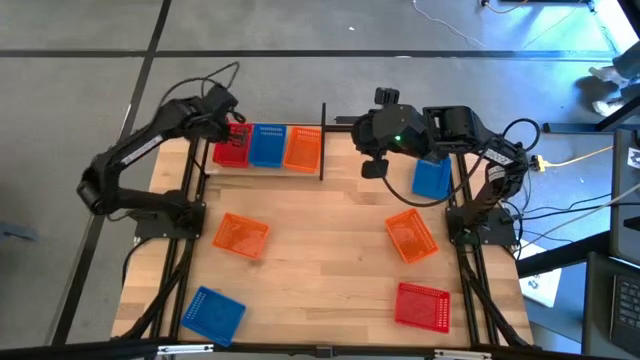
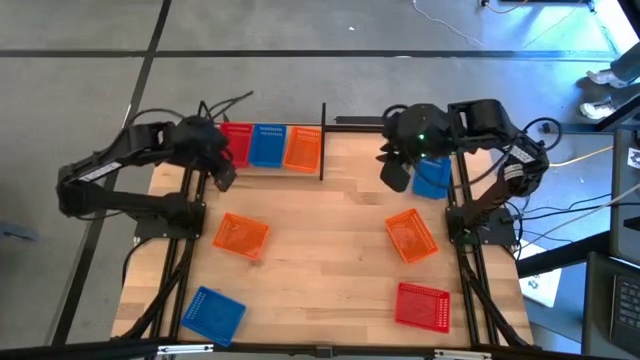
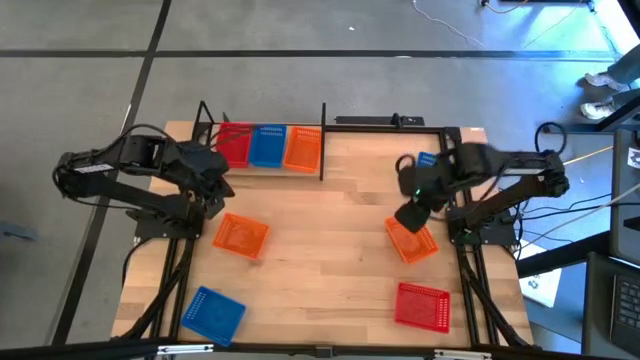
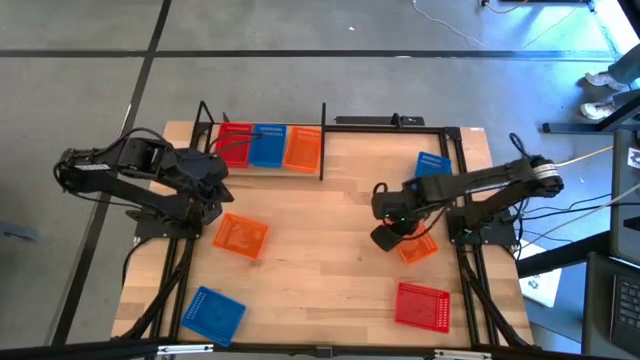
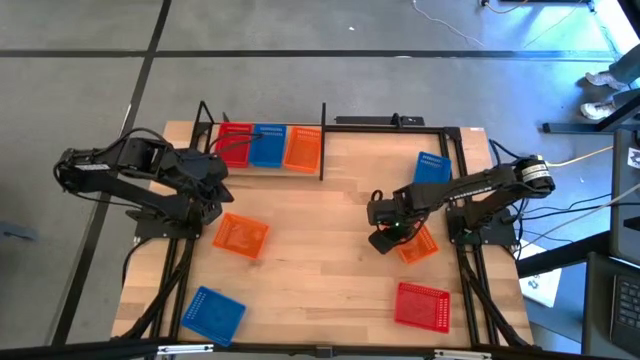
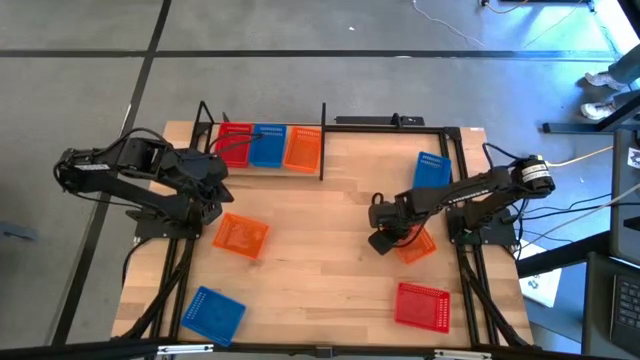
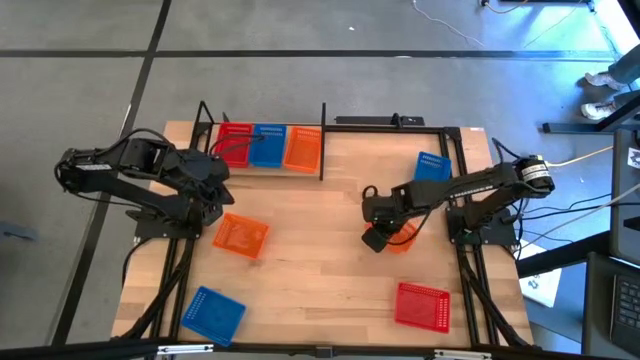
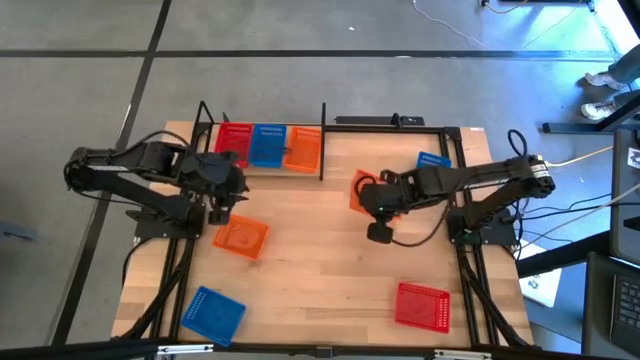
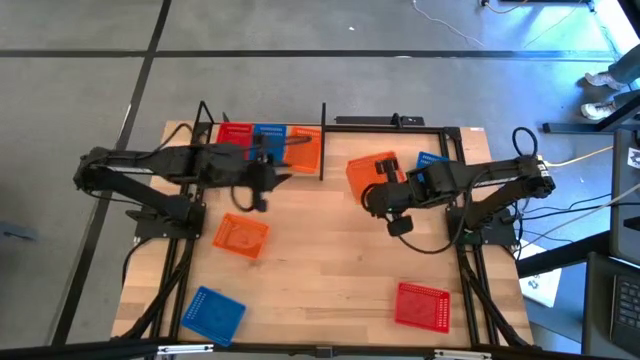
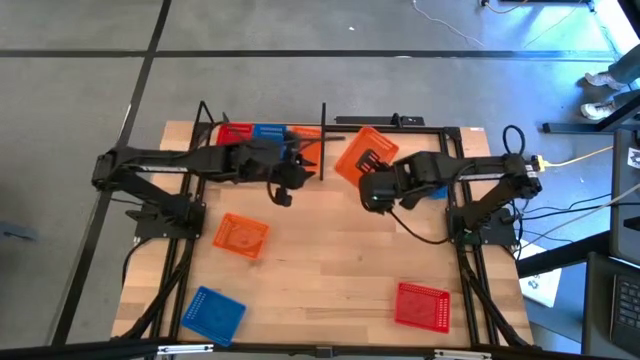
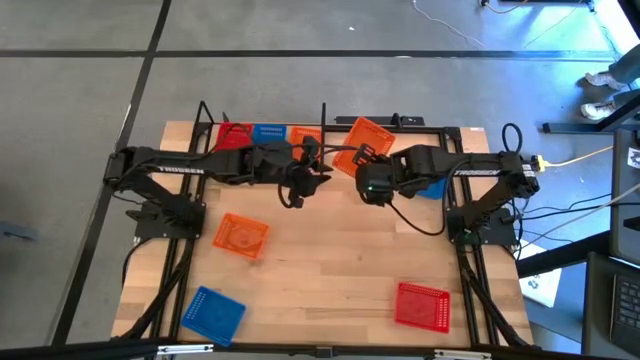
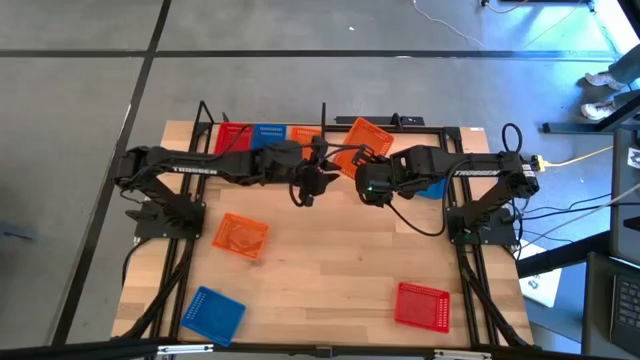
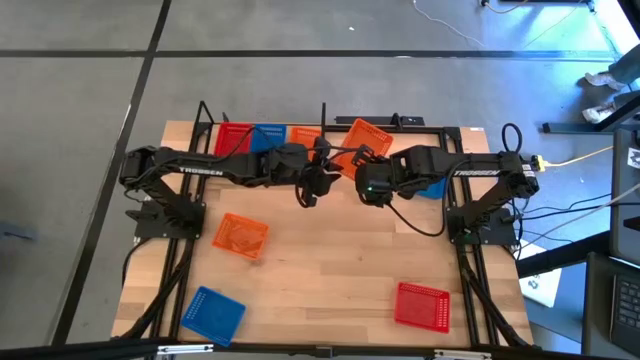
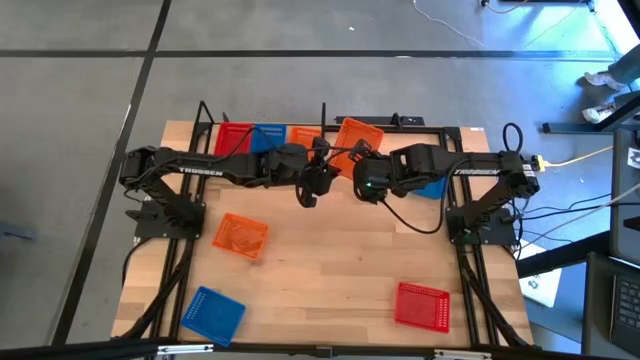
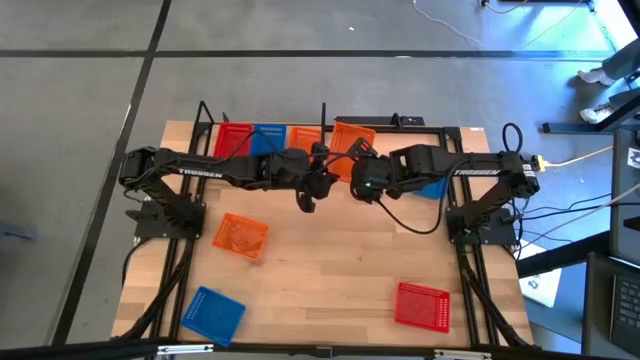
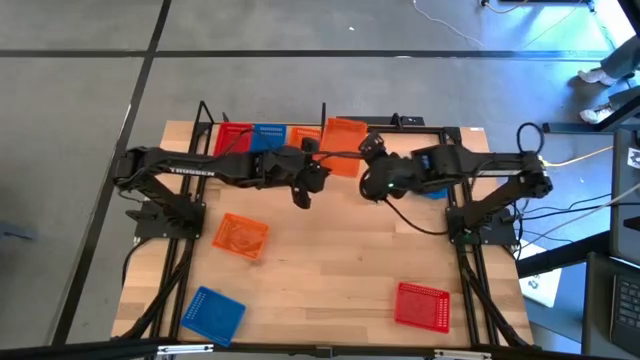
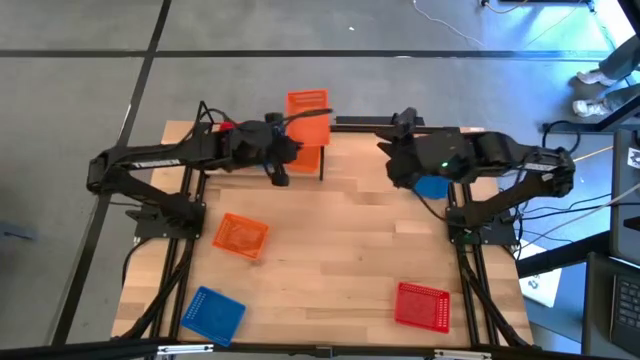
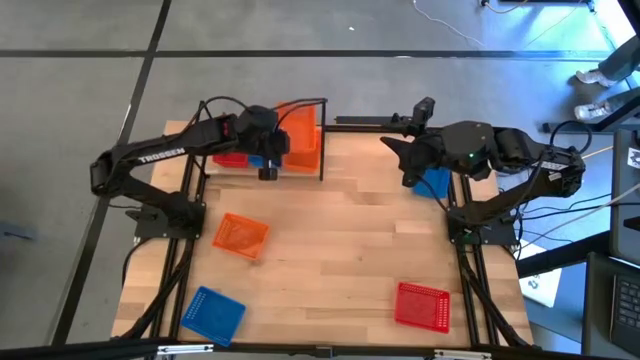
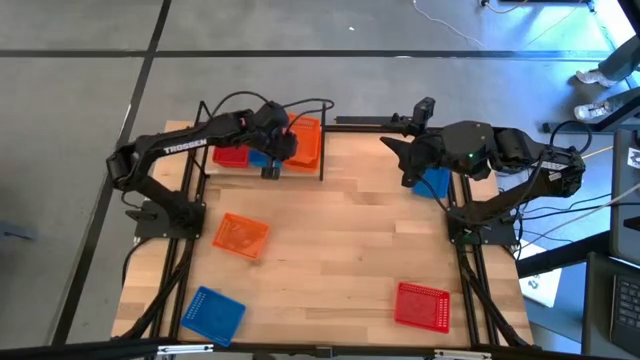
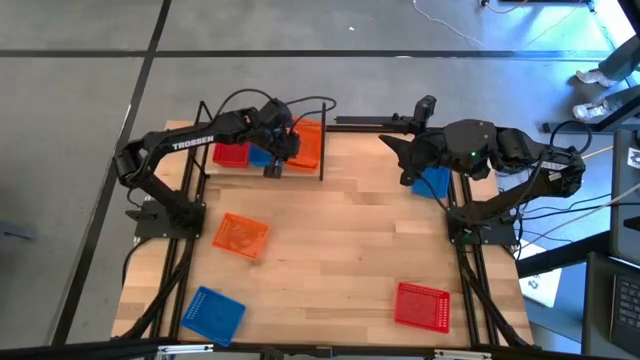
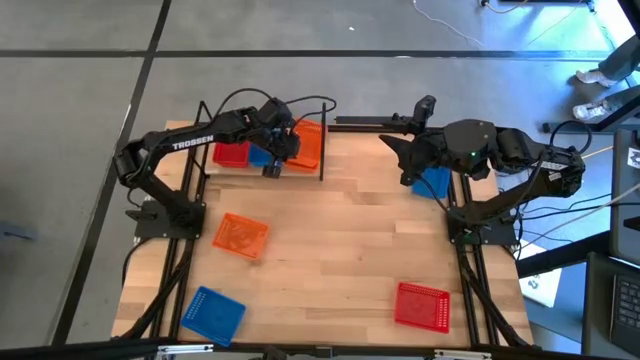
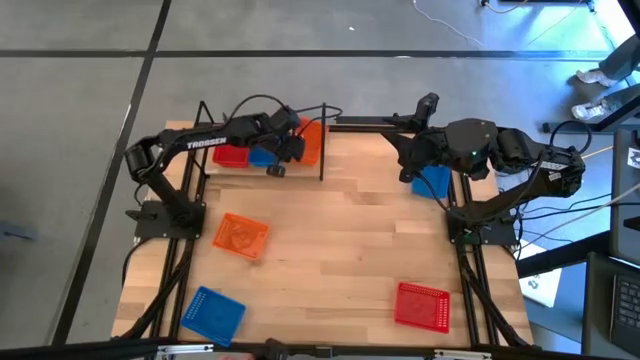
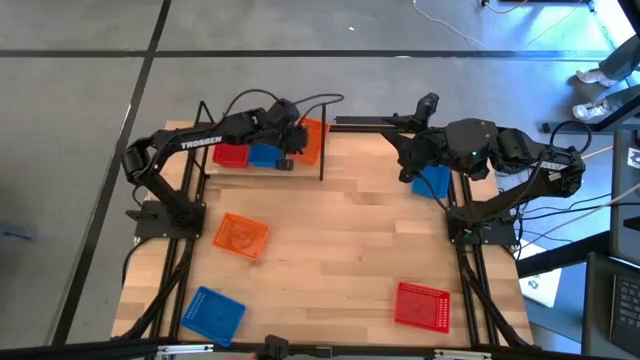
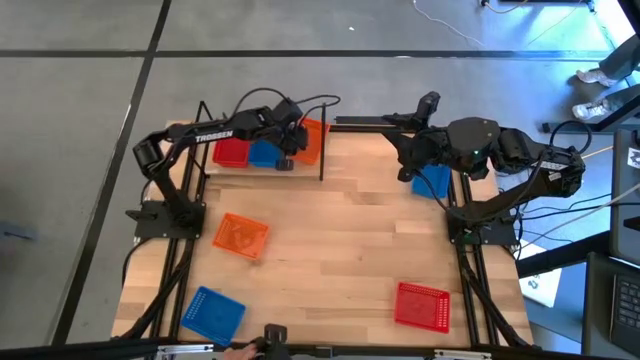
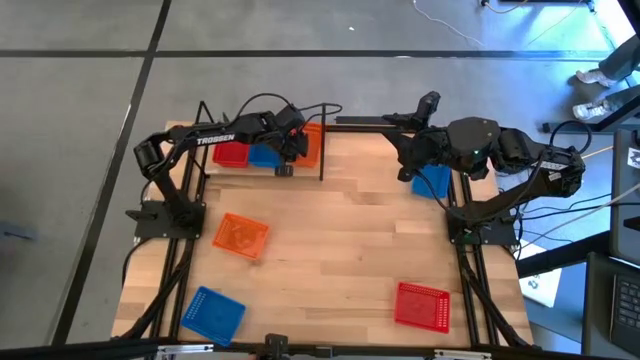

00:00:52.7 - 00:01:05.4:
Task: Stack baskets on shelf by color
Stack the right orange bin on the orange bin on the shelf

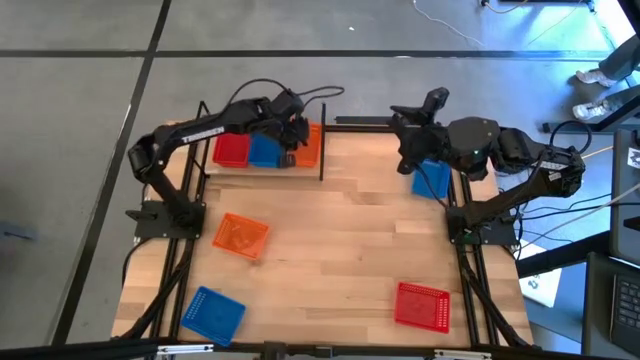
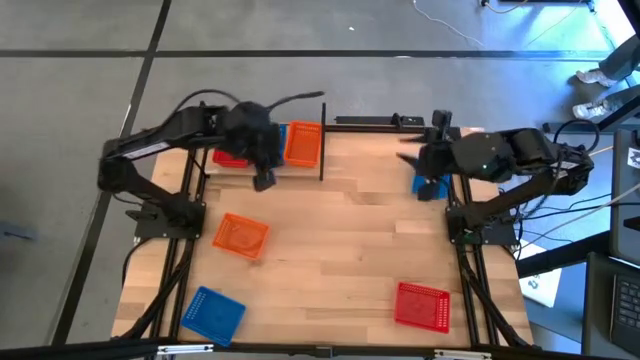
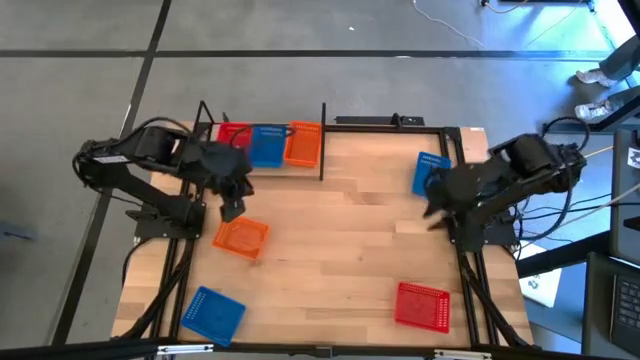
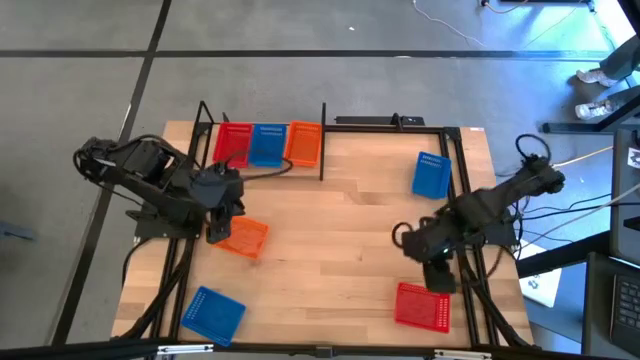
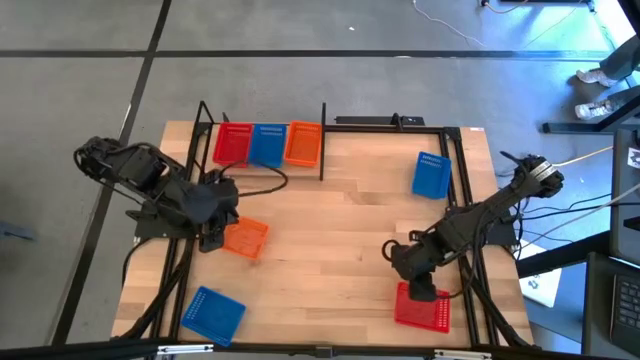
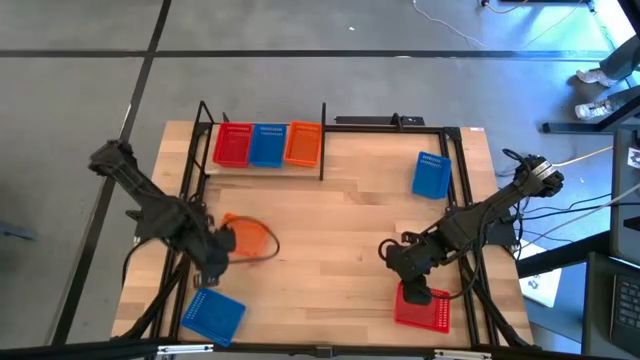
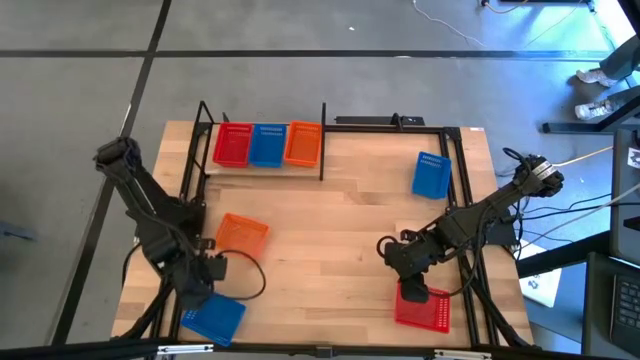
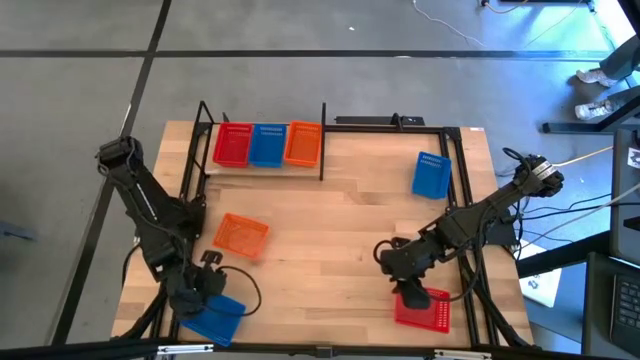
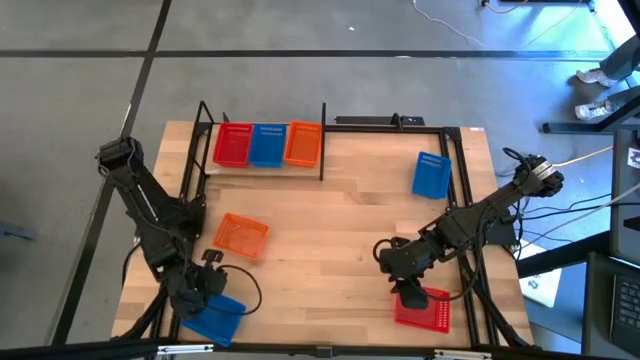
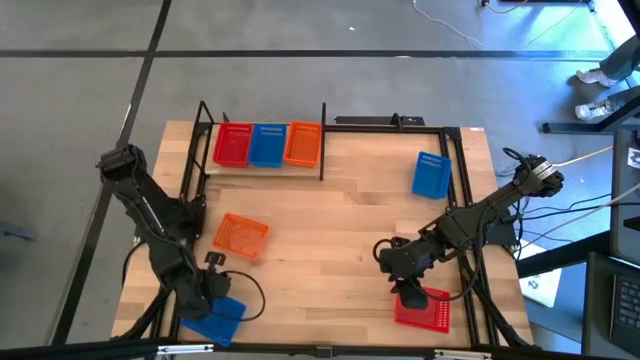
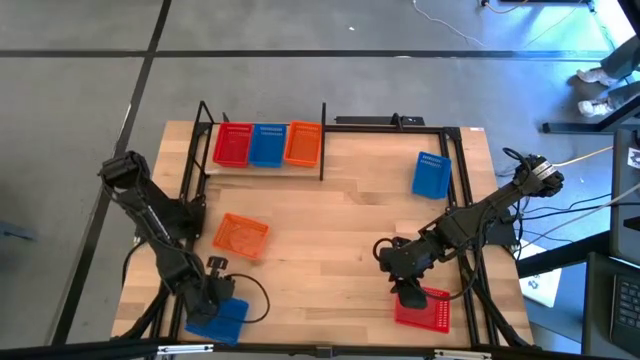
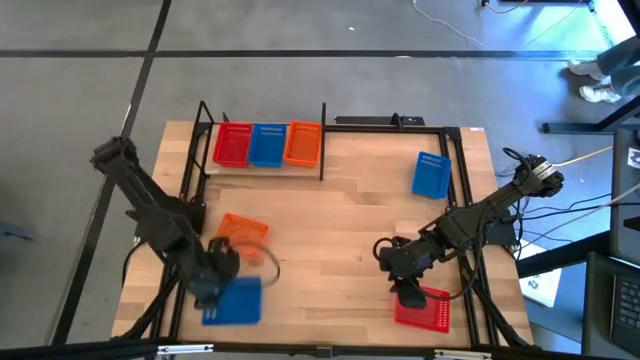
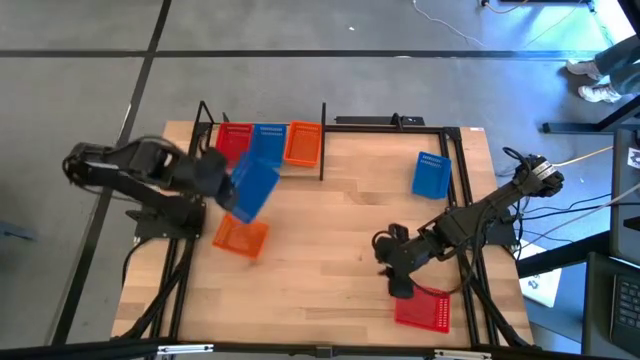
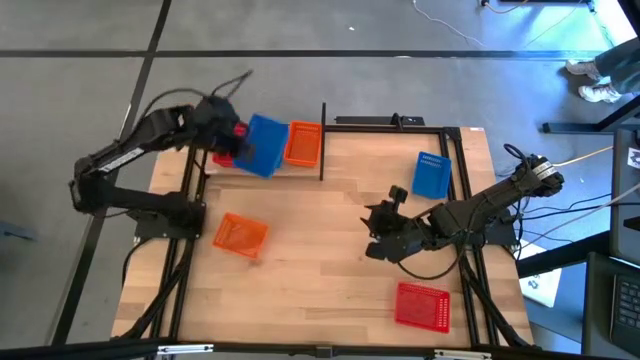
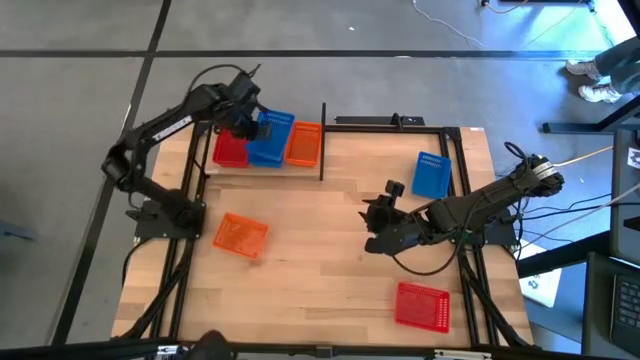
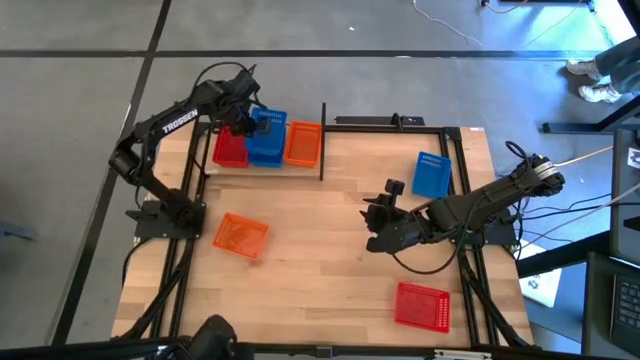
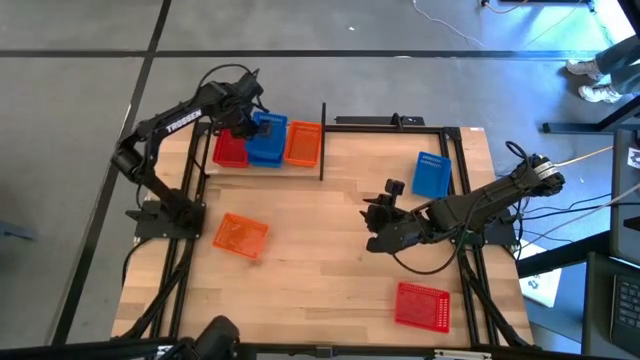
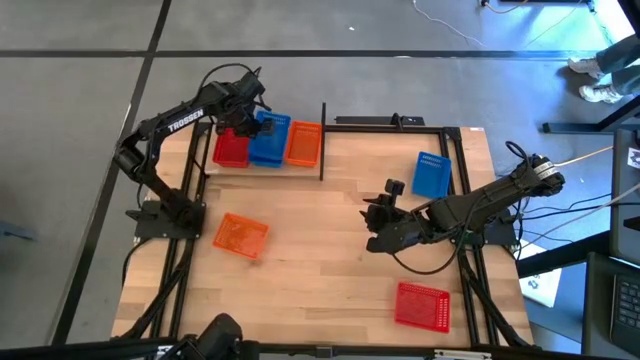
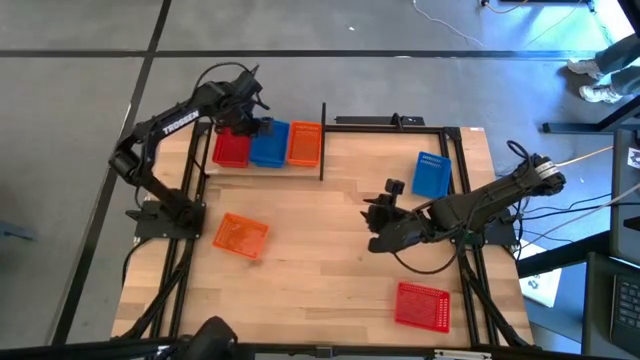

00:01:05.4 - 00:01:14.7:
Stack the bottom blue bin on the blue bin on the shelf
